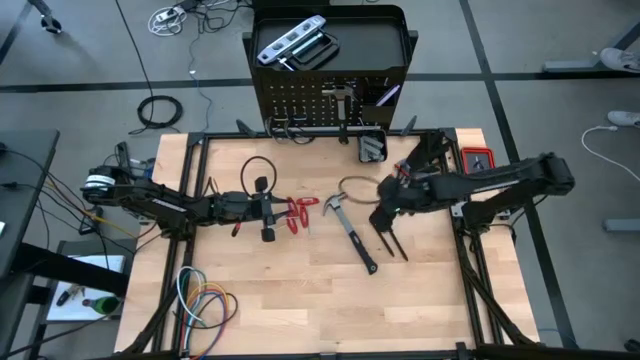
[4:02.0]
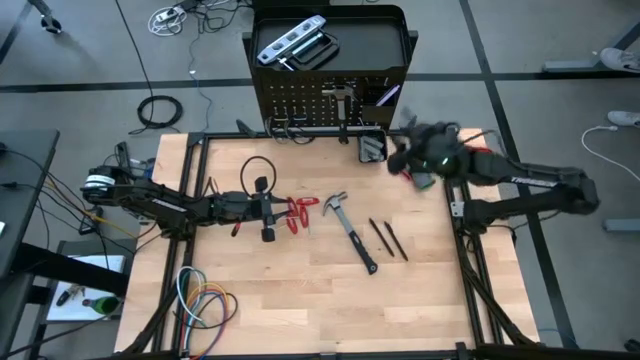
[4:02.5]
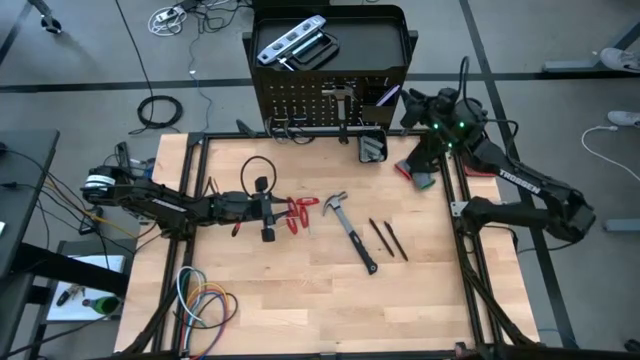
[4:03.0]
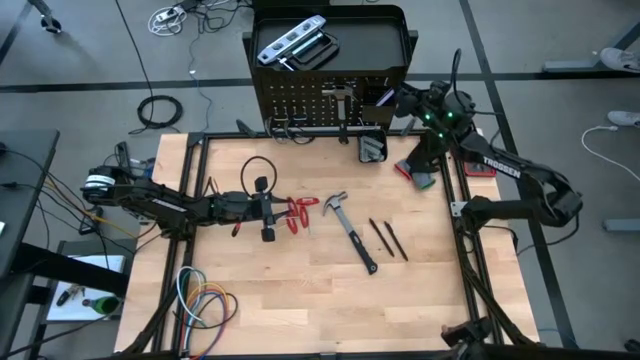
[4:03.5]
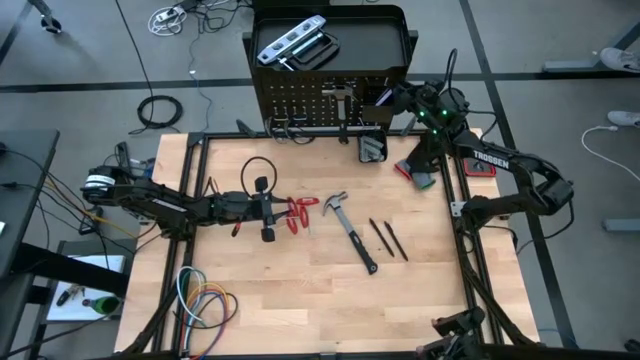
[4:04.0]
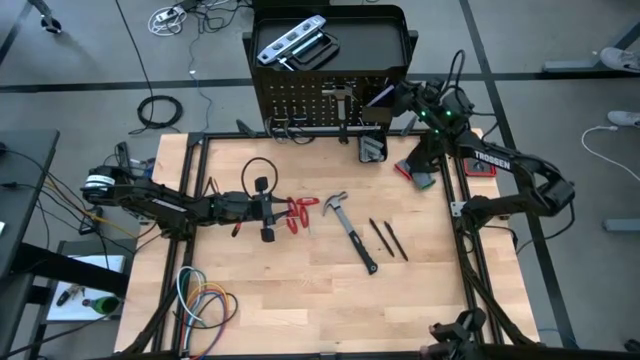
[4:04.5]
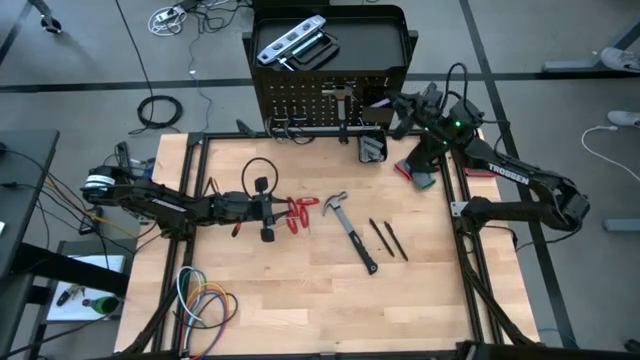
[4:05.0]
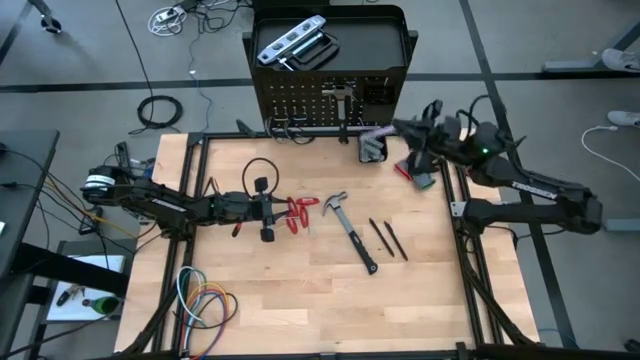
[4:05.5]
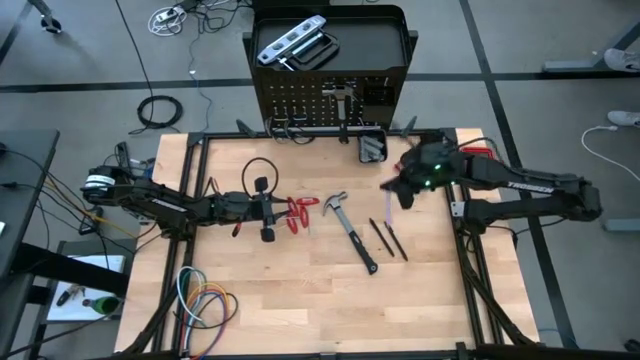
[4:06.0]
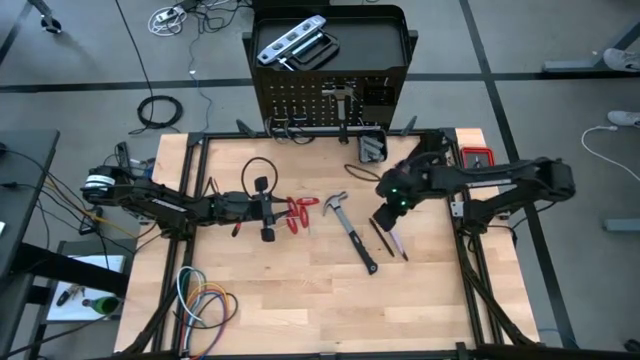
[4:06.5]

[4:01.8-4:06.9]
Task: Hang tools onto peg board
Remove the purple pen from the top basket from the peg board

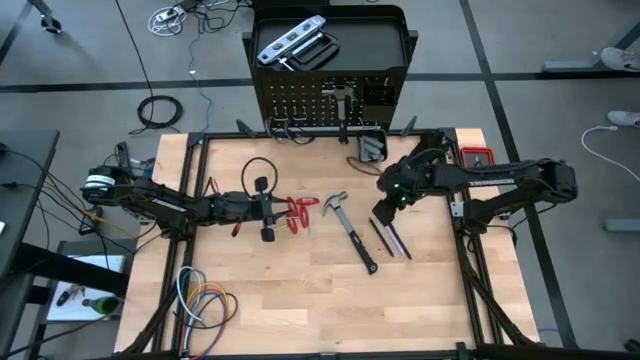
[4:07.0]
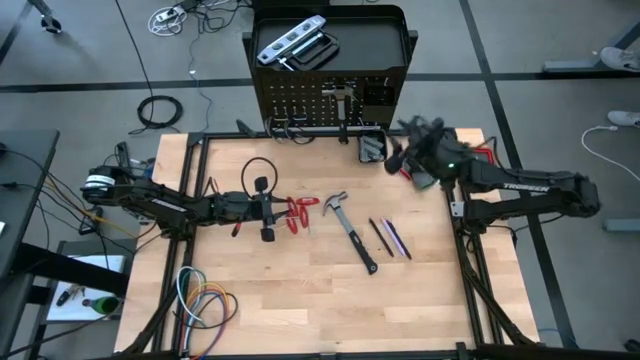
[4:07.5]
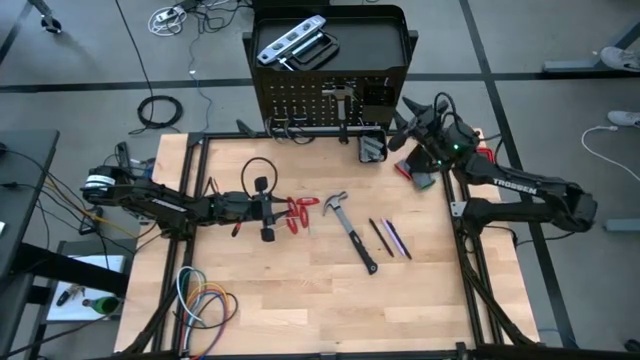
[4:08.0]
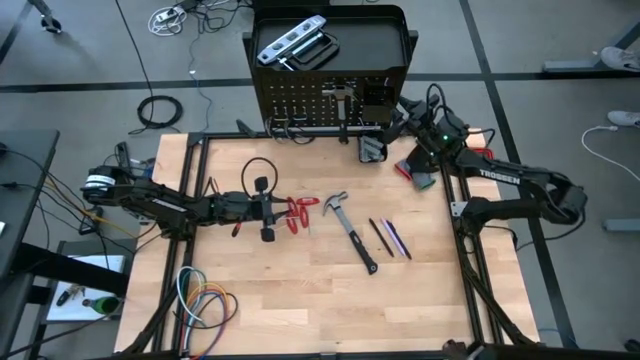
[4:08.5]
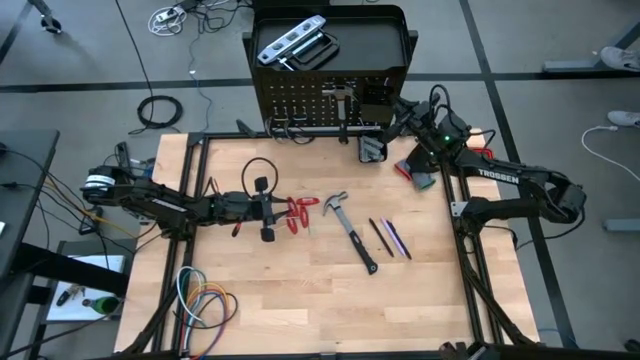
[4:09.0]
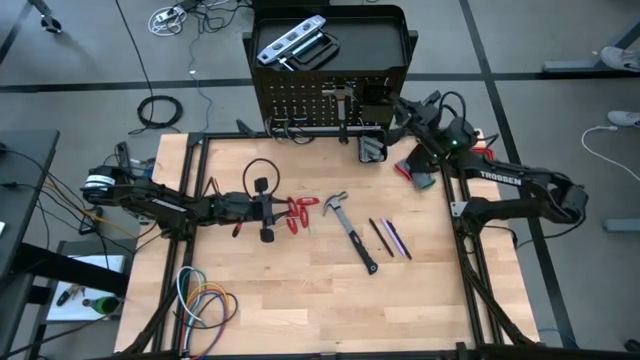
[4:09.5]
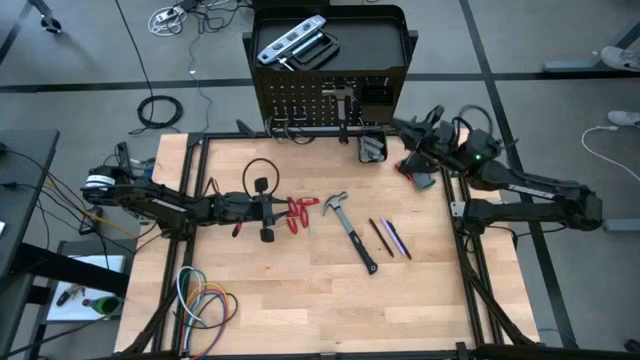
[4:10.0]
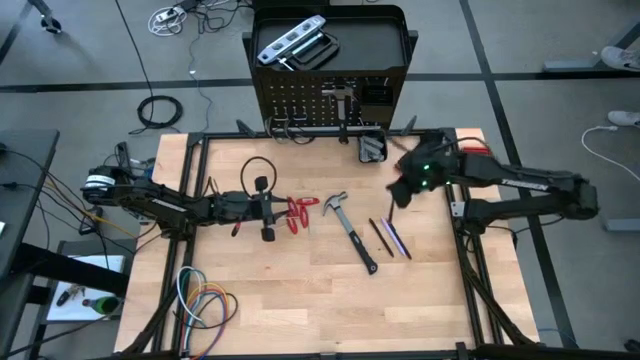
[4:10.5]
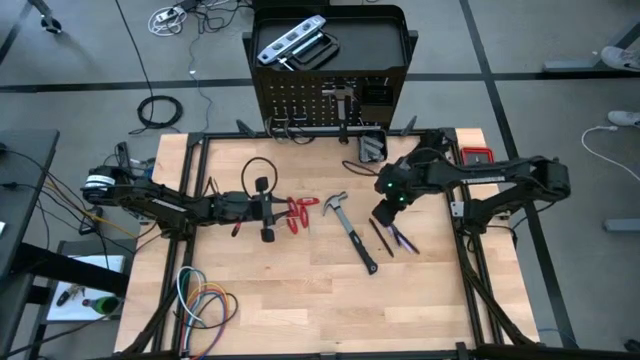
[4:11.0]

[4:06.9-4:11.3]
Remove the black pen from the top basket from the peg board

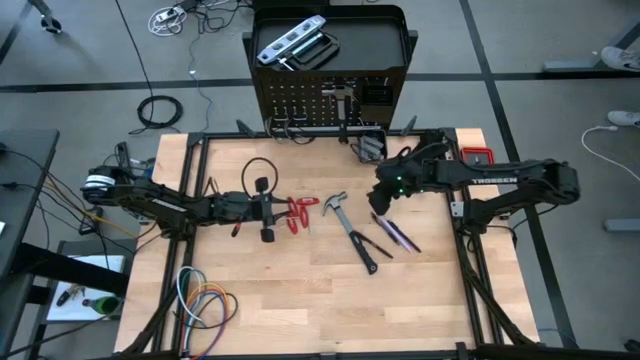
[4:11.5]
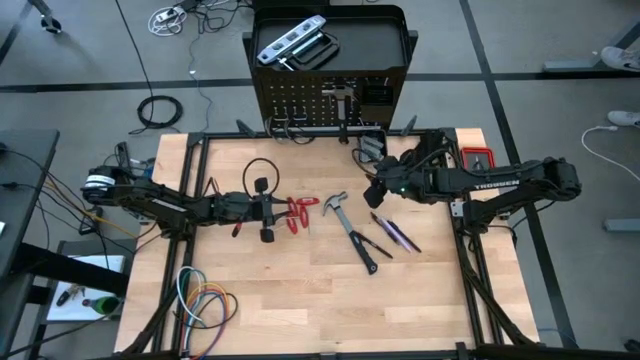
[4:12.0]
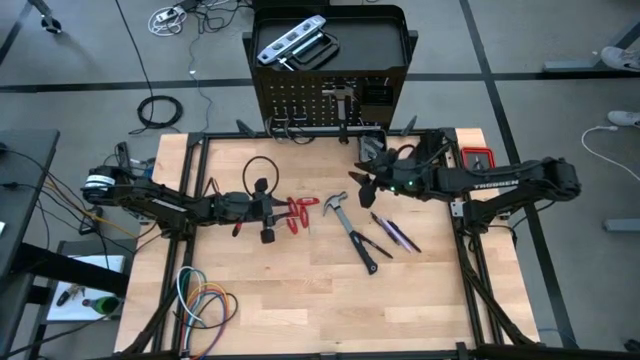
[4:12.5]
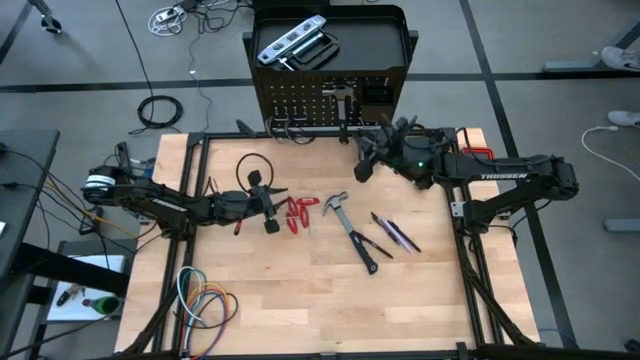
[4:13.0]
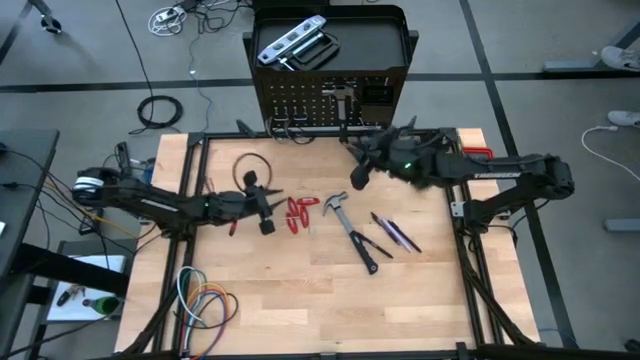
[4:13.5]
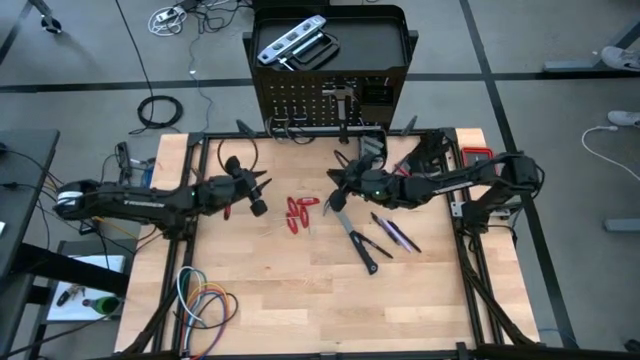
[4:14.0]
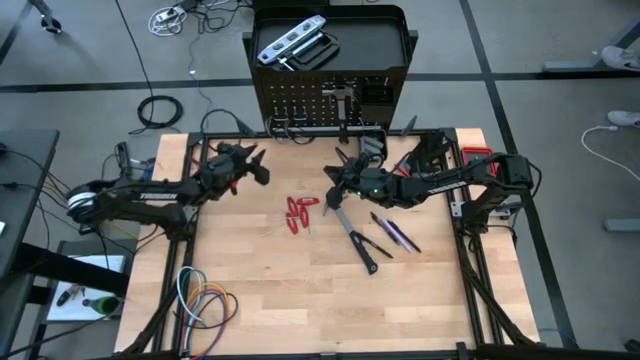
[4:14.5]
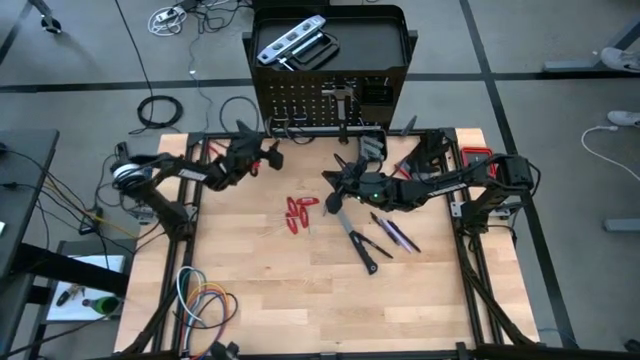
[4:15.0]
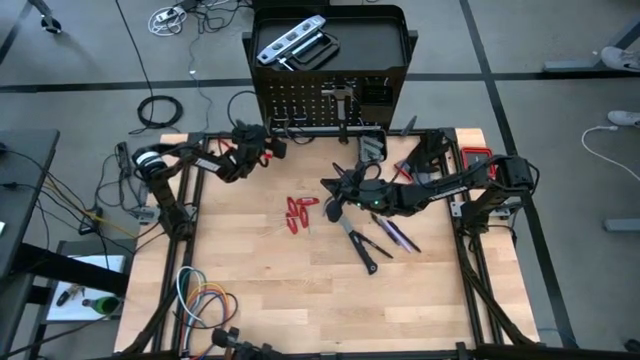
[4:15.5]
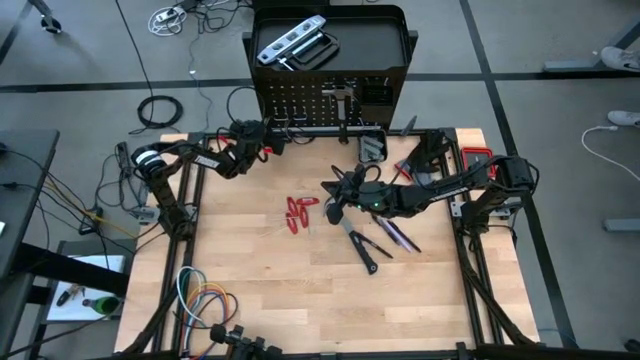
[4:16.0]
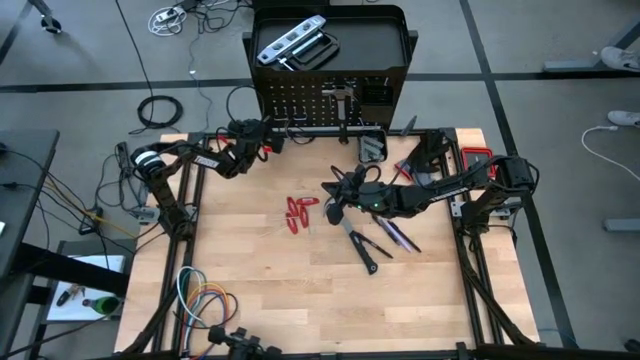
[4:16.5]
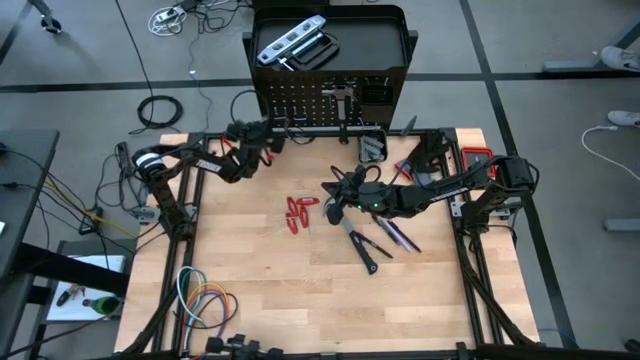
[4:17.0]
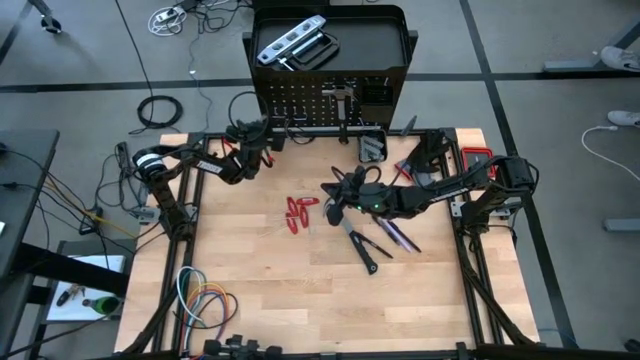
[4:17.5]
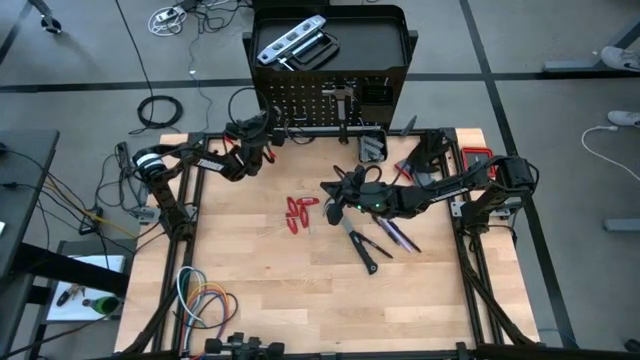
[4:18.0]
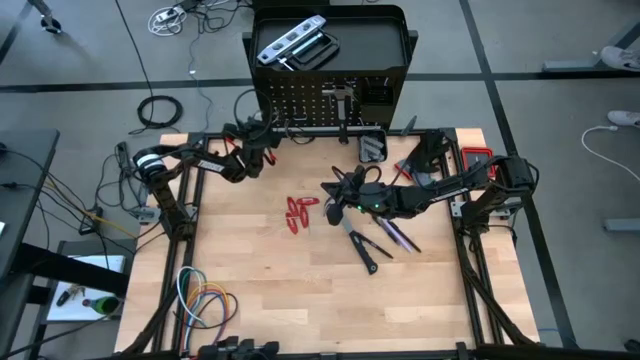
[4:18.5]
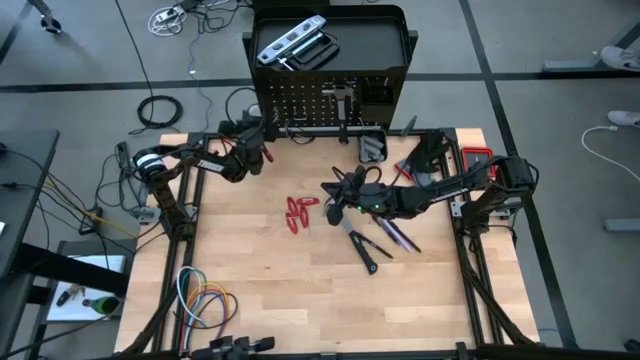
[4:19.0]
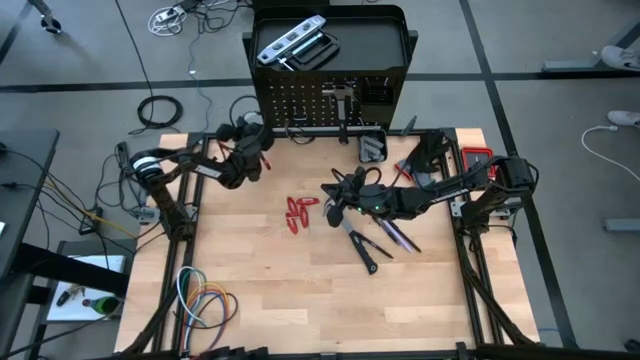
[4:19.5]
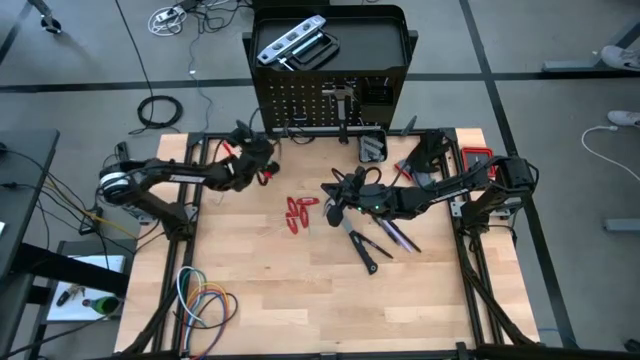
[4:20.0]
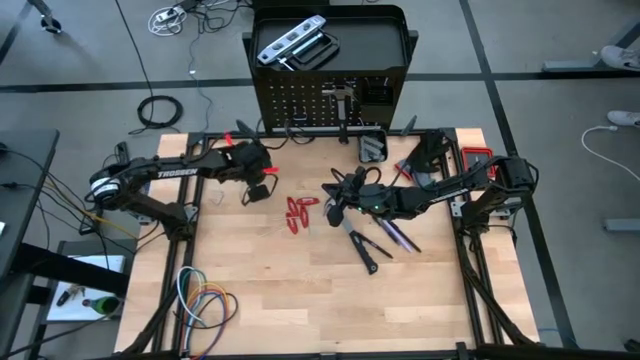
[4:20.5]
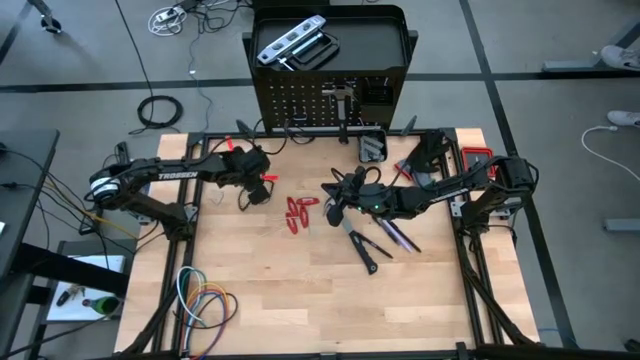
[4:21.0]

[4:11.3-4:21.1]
Remove the left glasses from the peg board

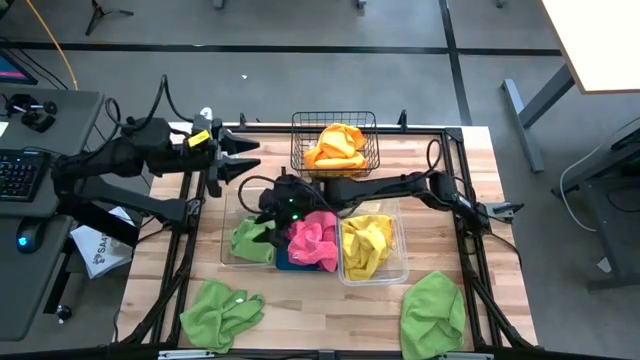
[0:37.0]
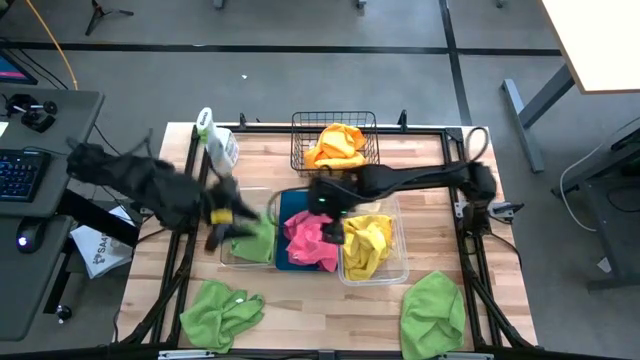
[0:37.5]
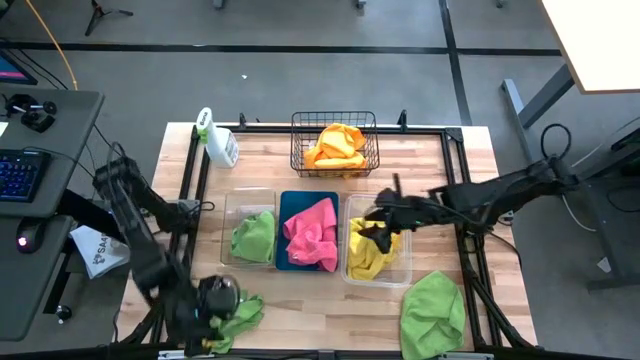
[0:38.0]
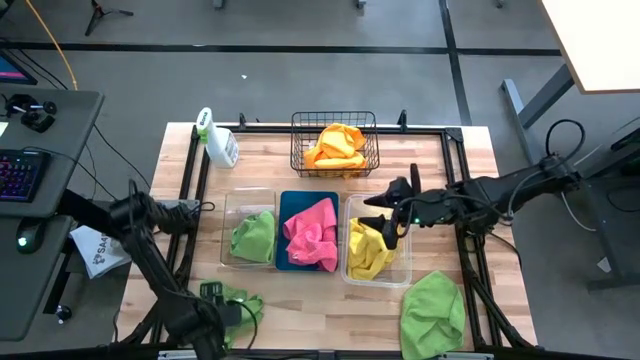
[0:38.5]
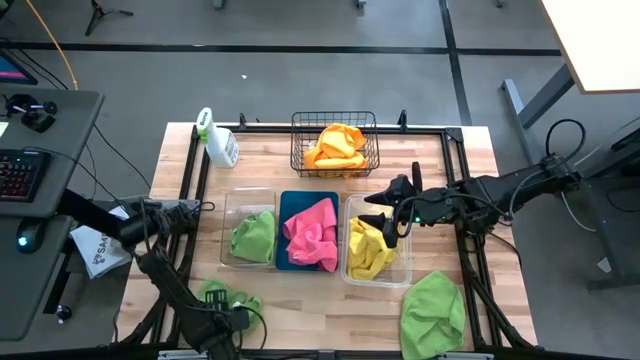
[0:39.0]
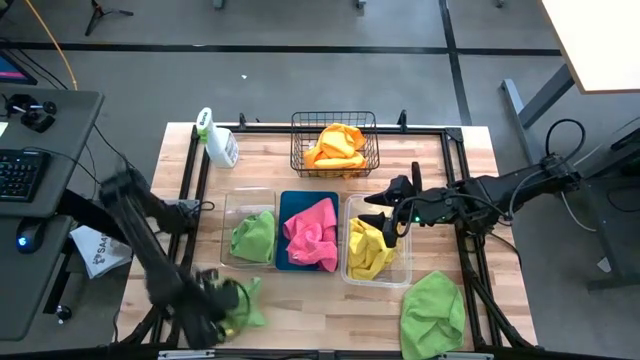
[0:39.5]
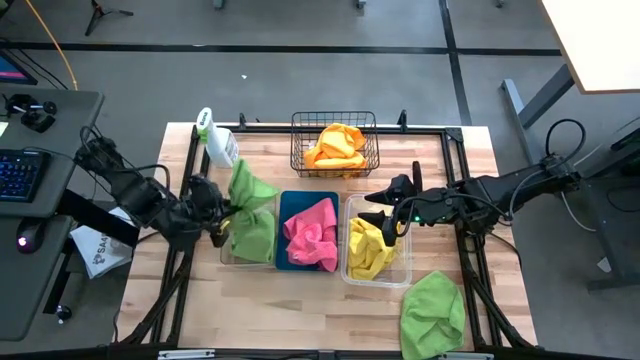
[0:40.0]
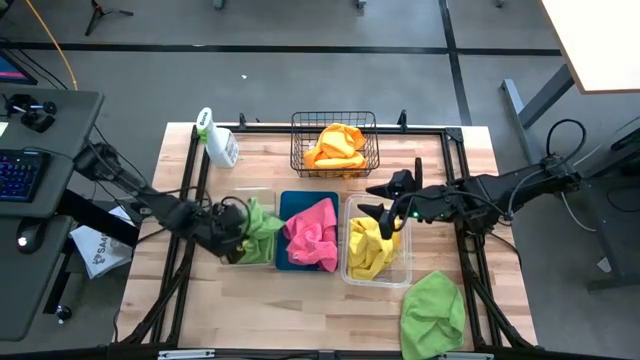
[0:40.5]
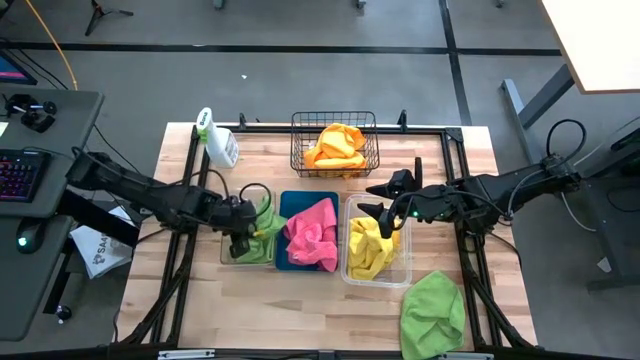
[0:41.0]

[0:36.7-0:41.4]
Task: Sort microfiber towel by color & place in baskets
Put the left green microfiber cloth into the left transparent bin
